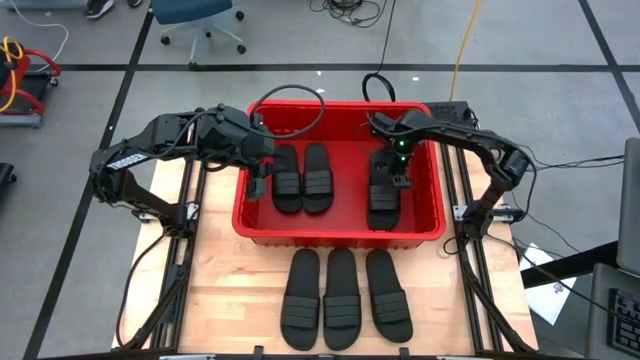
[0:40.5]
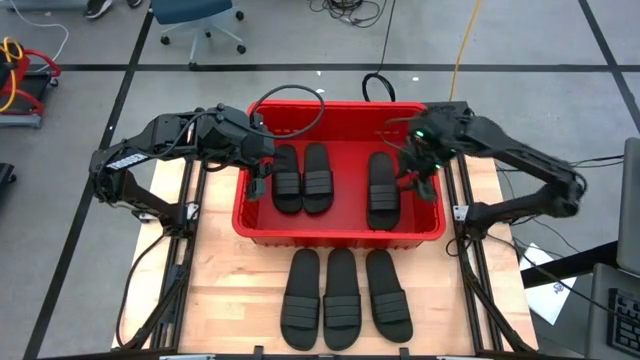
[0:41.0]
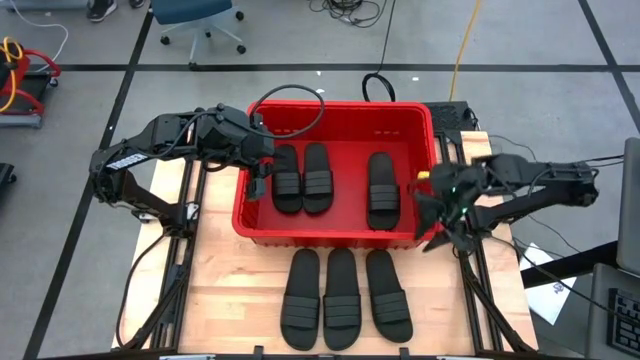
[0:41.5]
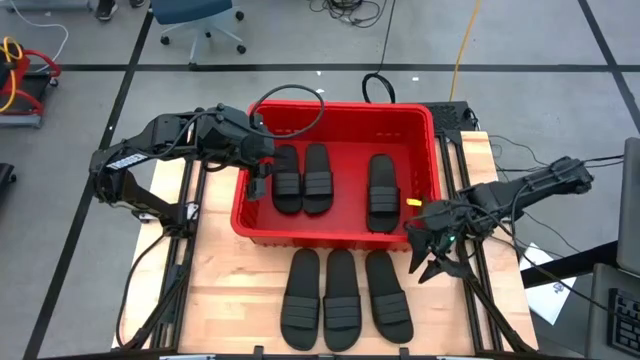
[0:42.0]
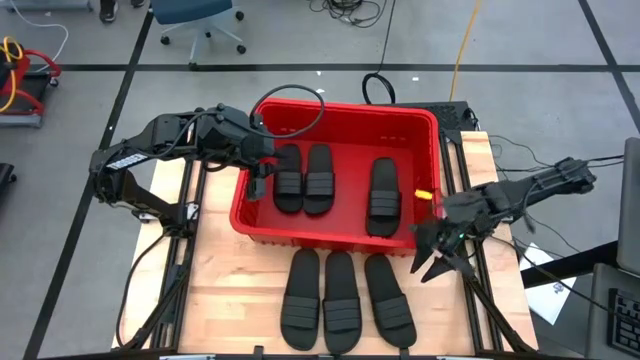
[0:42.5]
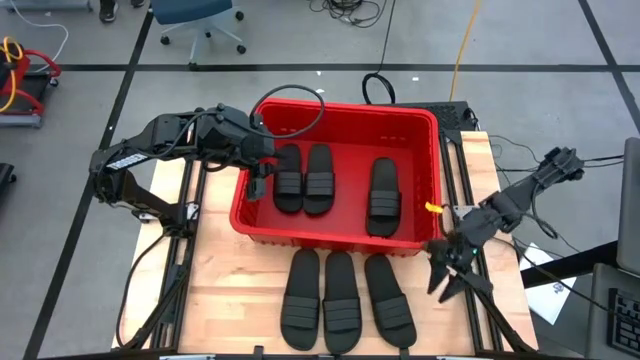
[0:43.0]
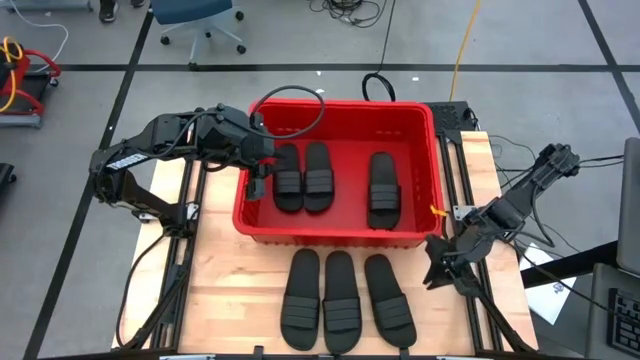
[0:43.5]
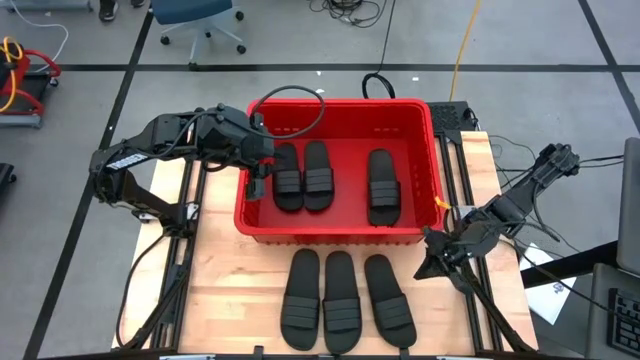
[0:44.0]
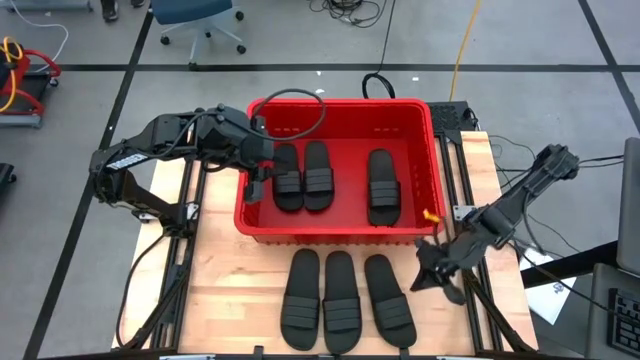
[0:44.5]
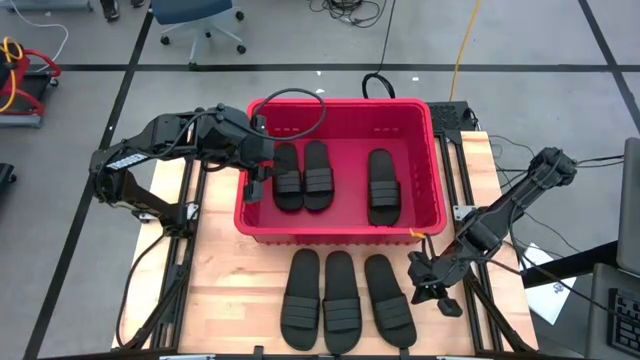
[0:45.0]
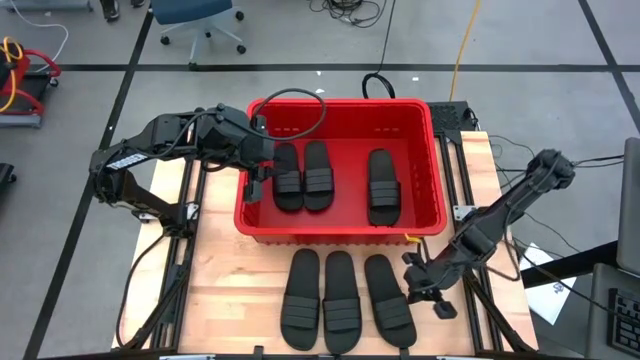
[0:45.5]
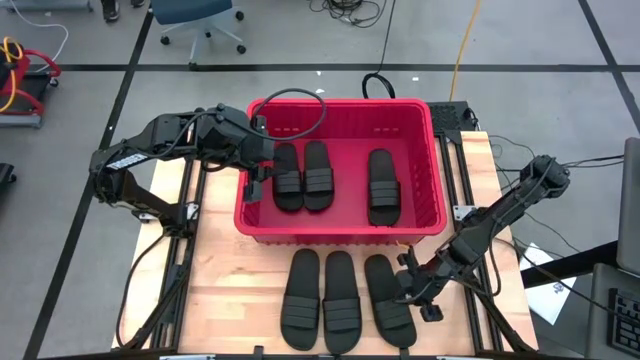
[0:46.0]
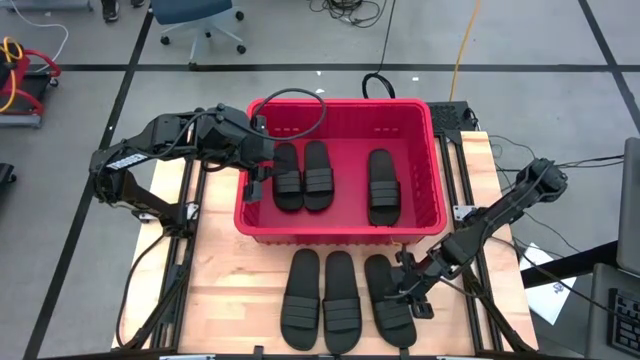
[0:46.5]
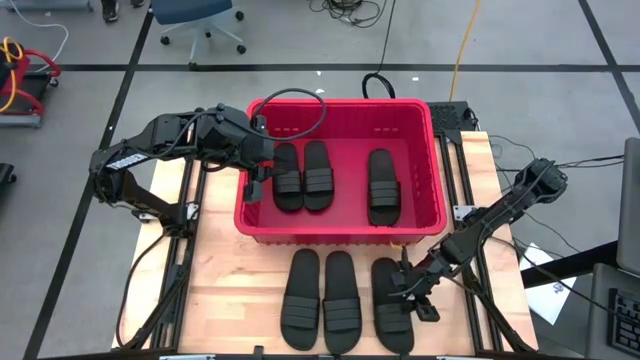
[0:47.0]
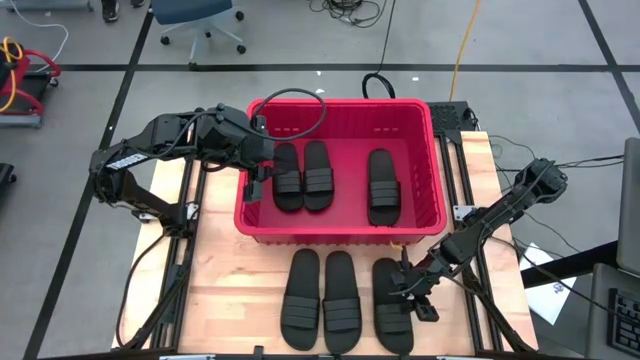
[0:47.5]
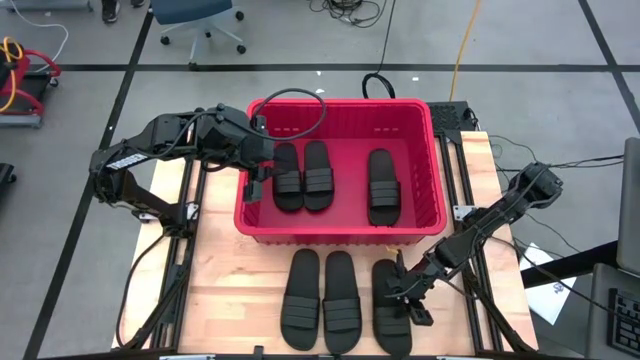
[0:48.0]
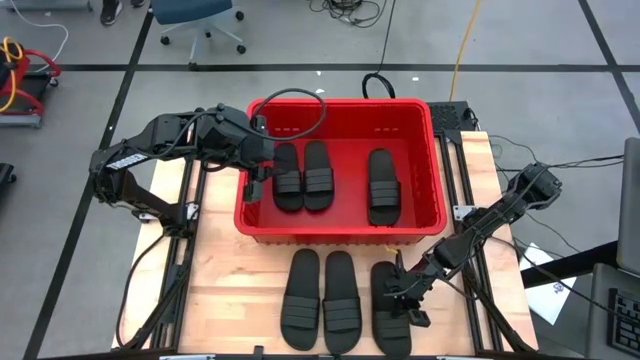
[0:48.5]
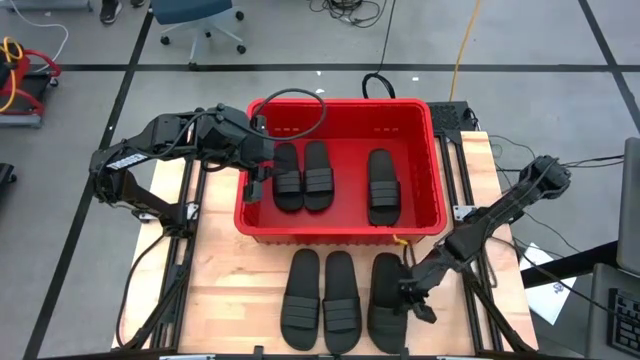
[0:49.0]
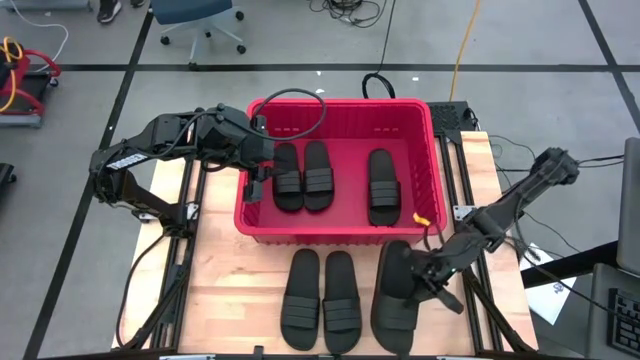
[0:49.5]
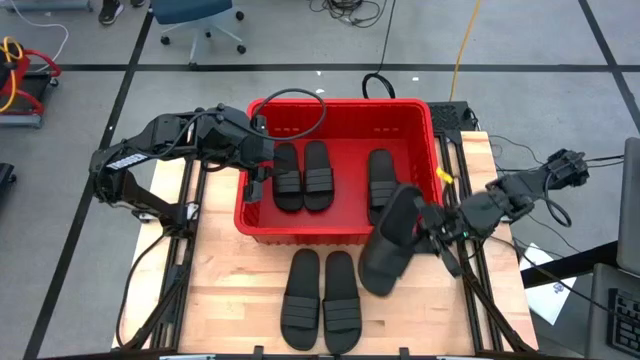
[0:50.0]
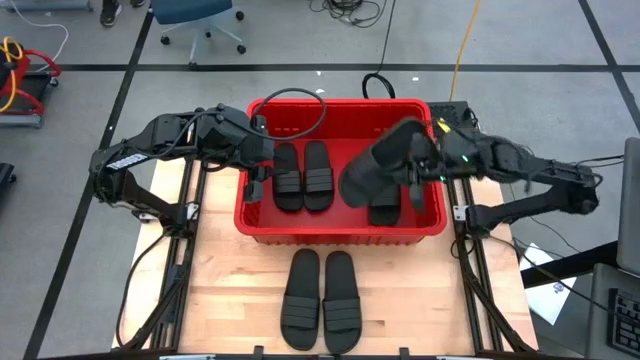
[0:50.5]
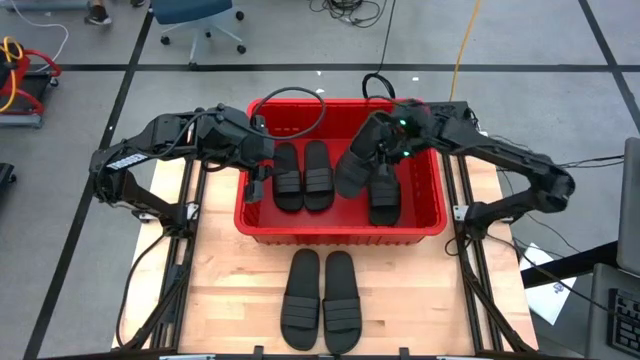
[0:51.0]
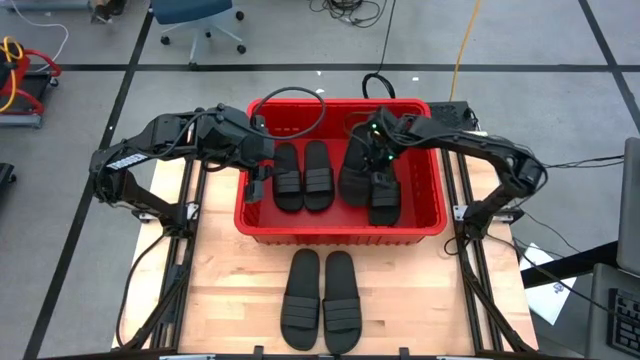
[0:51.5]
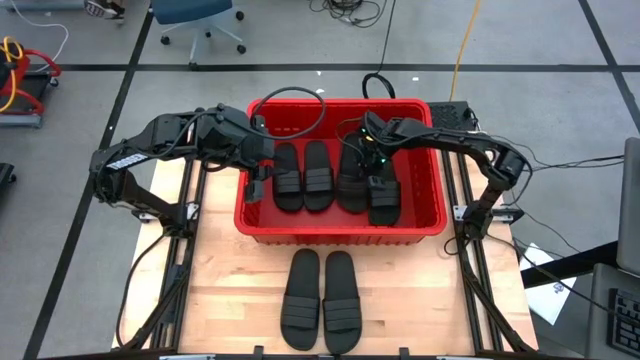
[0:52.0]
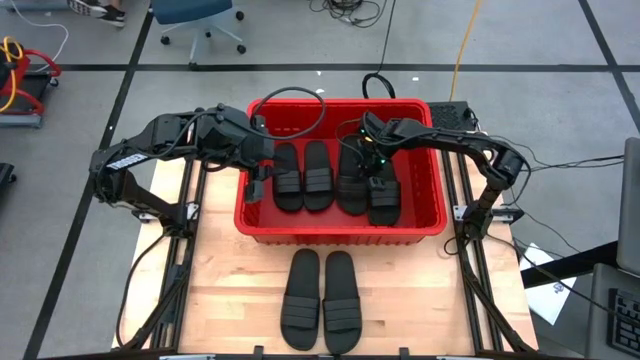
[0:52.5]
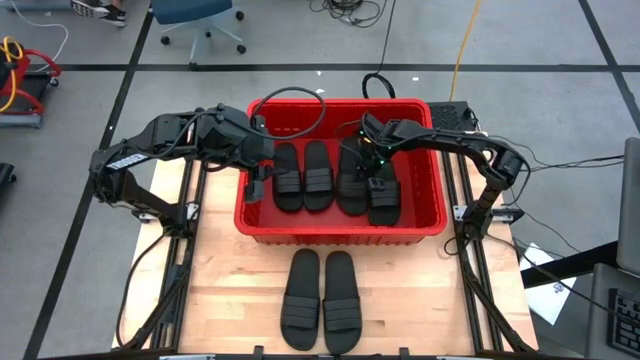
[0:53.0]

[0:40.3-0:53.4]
Task: Pick and place slides into bin
Put the black slide into the red bin

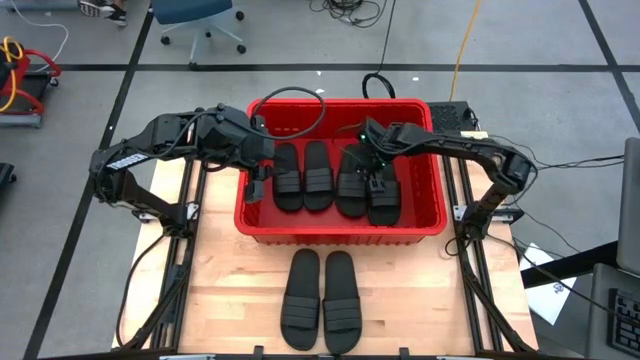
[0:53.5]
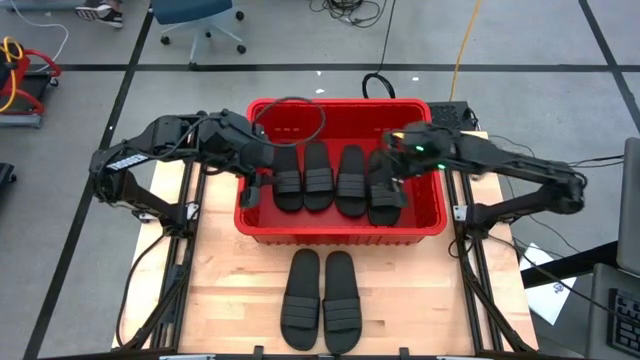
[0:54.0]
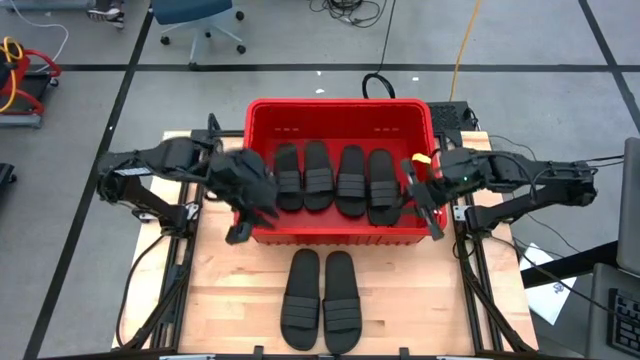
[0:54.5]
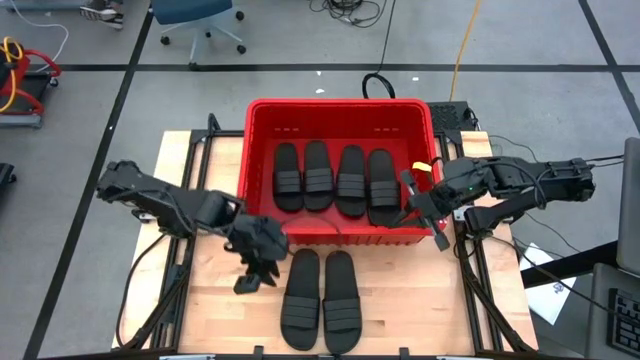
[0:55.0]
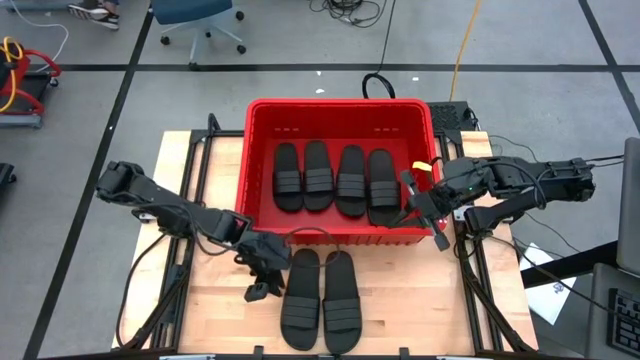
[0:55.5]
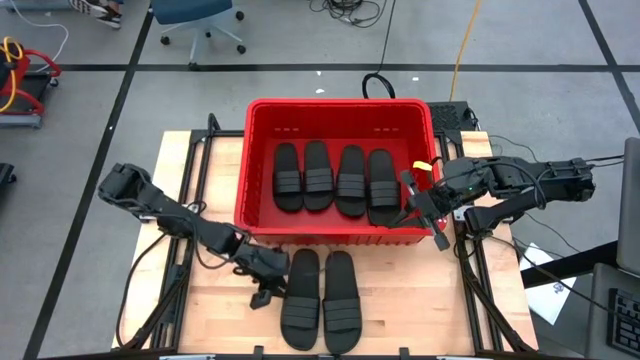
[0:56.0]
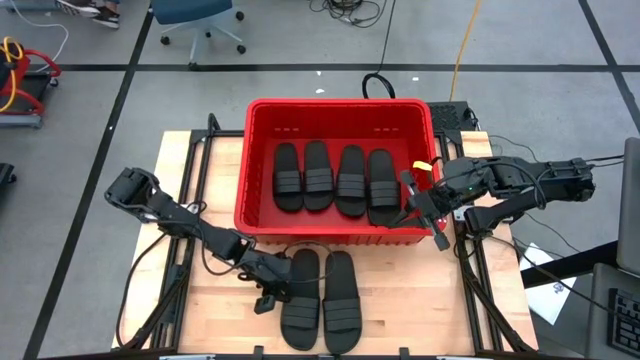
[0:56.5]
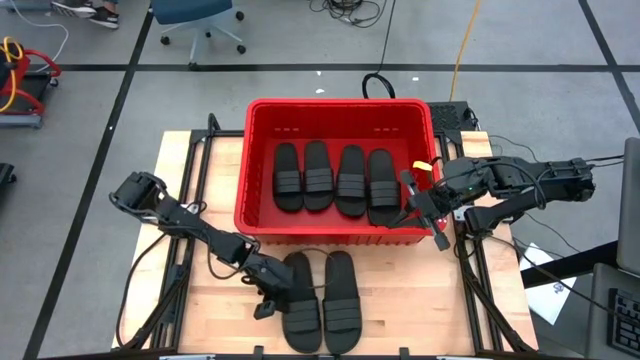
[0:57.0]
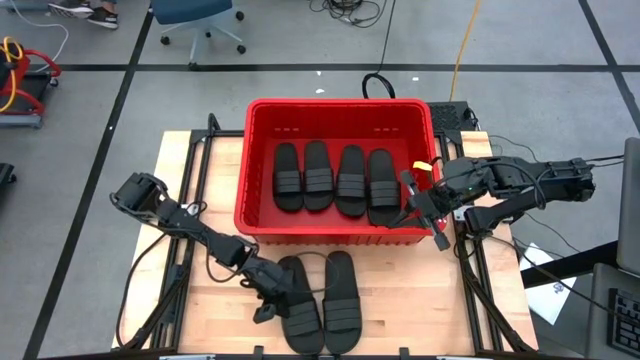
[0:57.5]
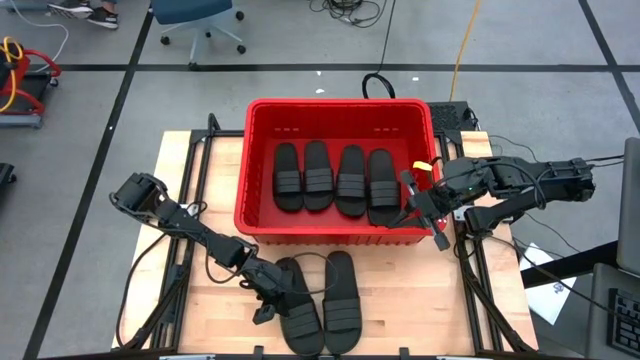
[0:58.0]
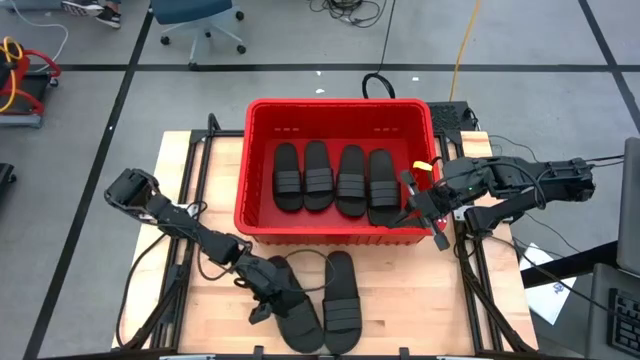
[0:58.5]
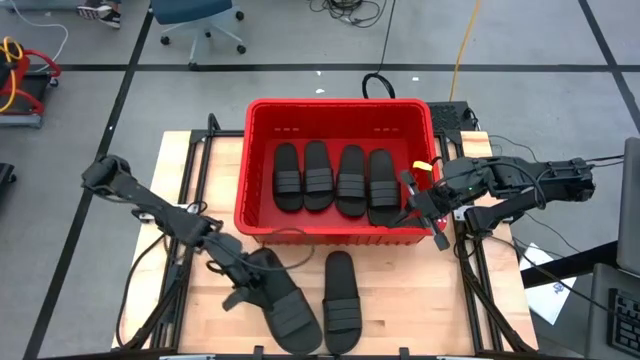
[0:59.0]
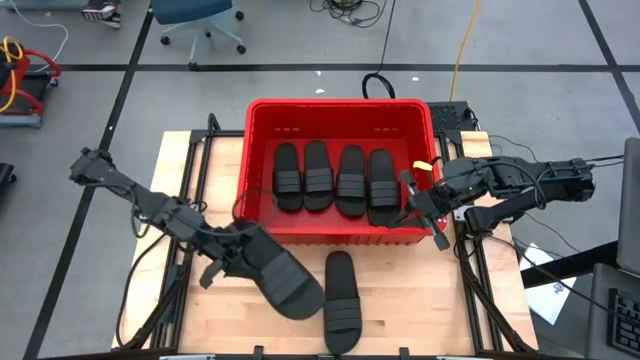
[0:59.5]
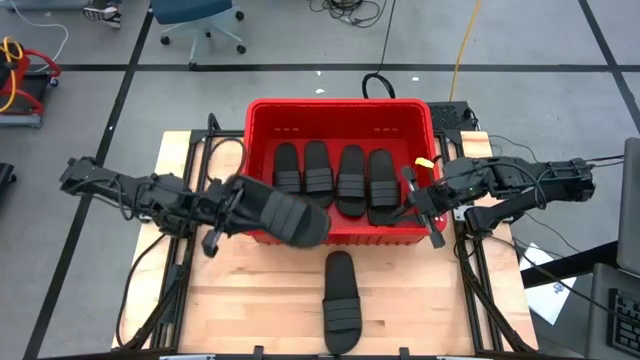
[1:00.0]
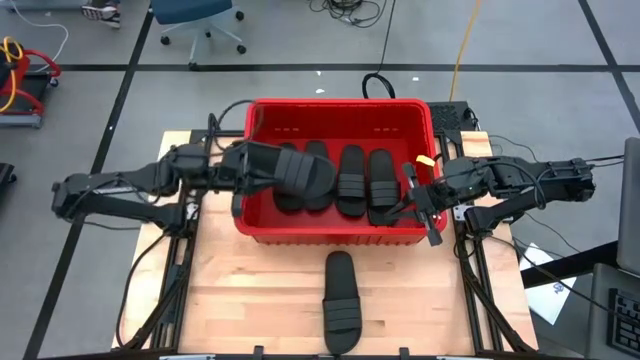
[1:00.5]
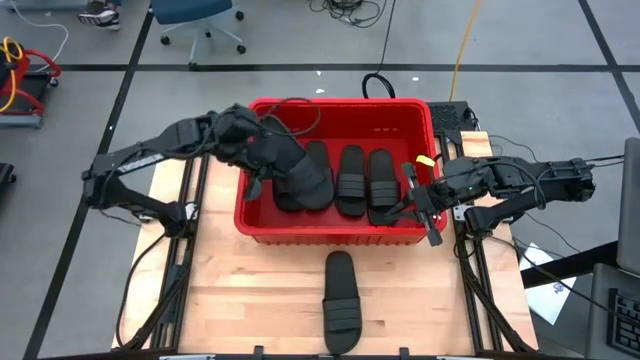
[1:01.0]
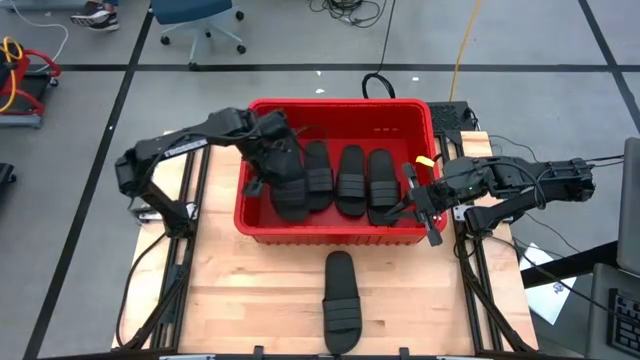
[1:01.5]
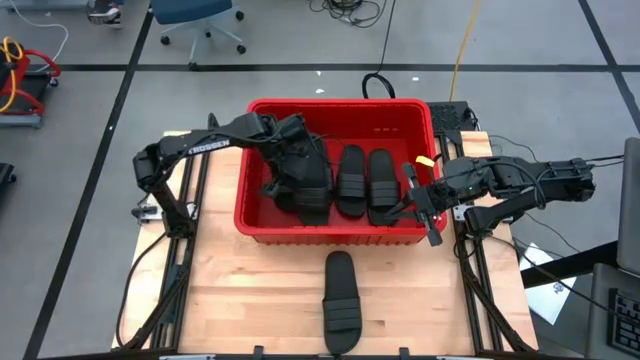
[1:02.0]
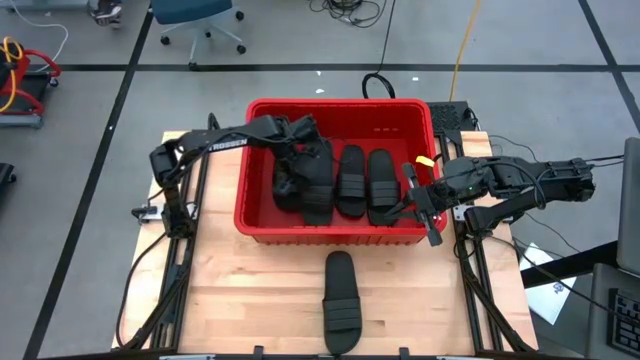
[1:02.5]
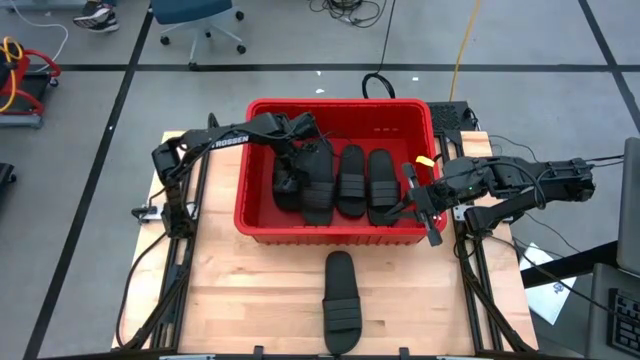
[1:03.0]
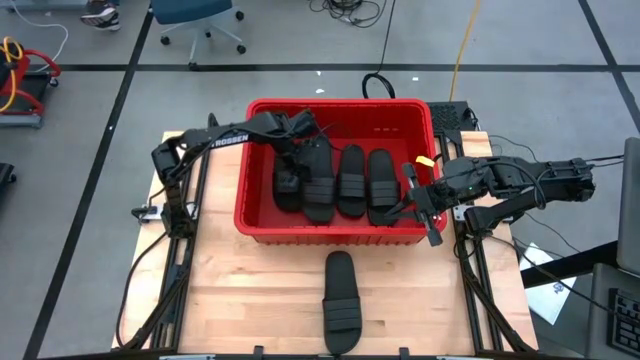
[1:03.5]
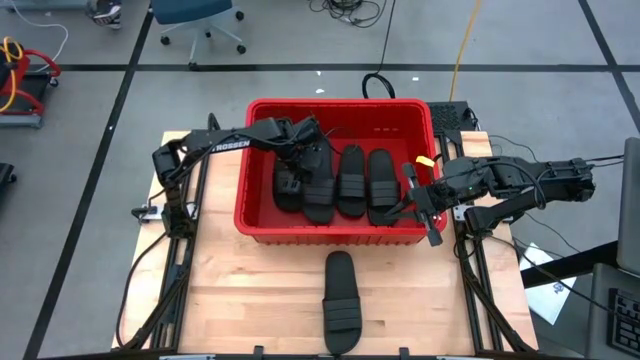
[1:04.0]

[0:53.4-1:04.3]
Put the black slide into the red bin
